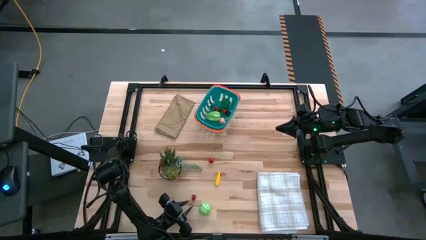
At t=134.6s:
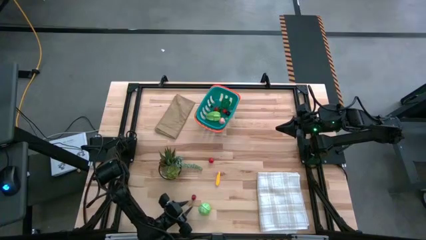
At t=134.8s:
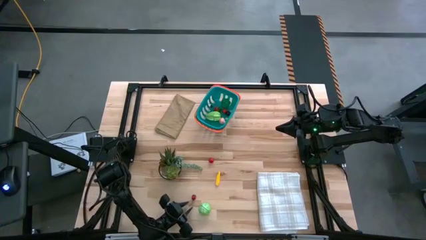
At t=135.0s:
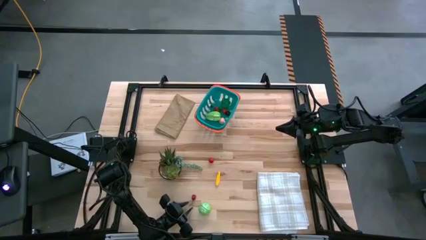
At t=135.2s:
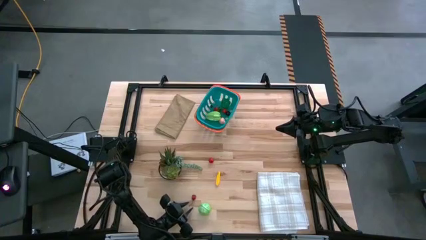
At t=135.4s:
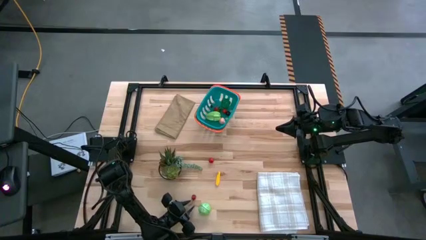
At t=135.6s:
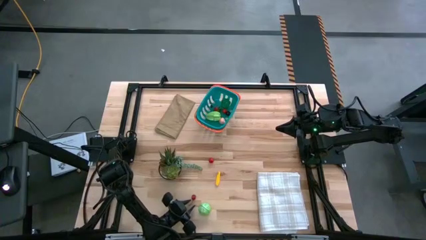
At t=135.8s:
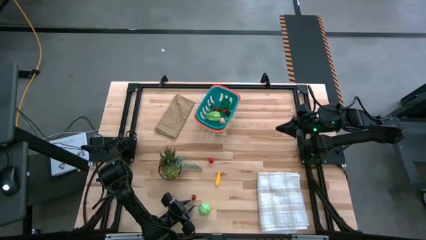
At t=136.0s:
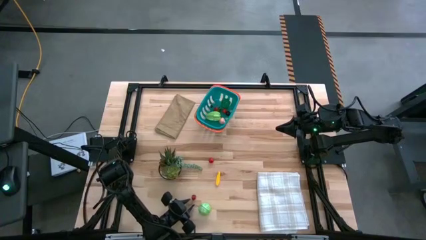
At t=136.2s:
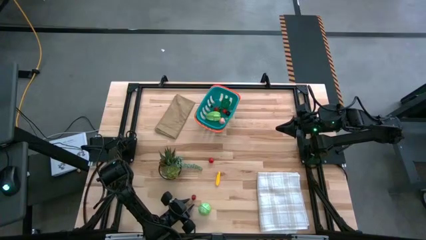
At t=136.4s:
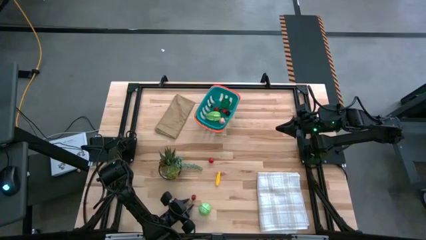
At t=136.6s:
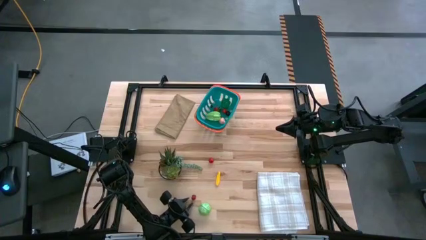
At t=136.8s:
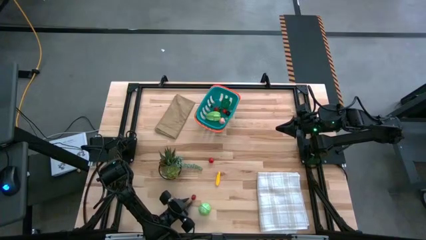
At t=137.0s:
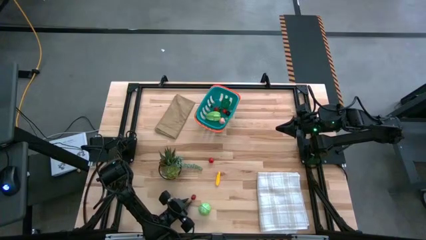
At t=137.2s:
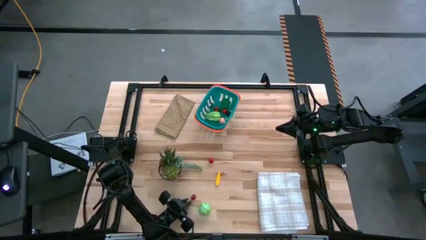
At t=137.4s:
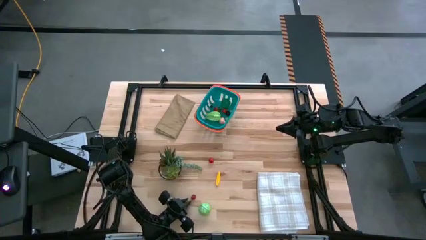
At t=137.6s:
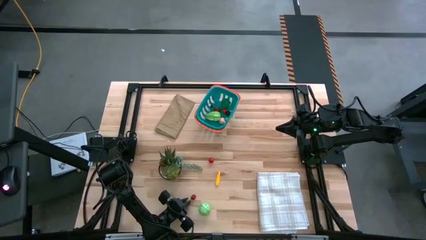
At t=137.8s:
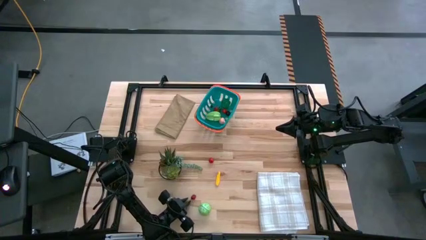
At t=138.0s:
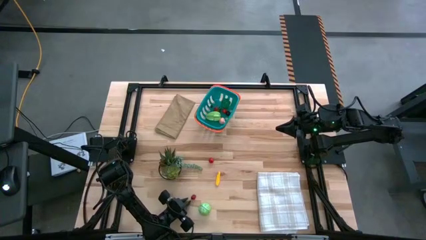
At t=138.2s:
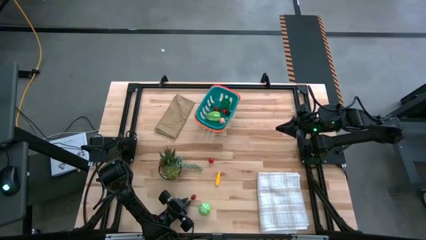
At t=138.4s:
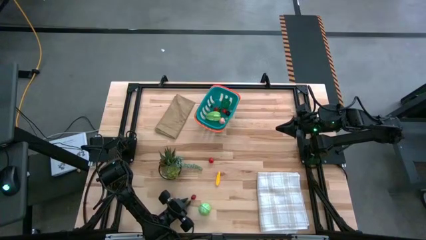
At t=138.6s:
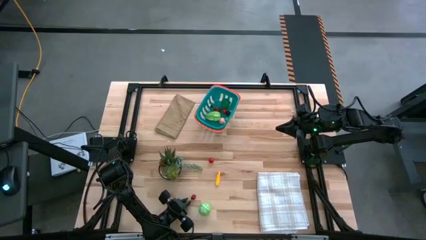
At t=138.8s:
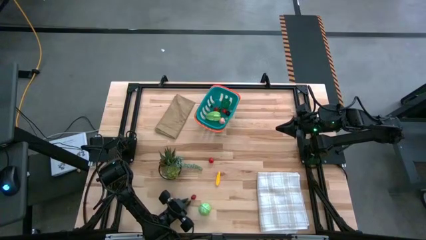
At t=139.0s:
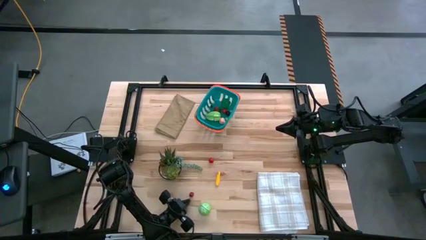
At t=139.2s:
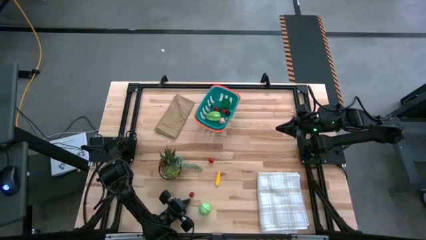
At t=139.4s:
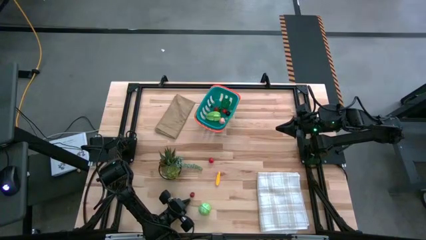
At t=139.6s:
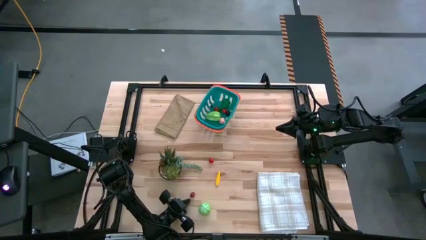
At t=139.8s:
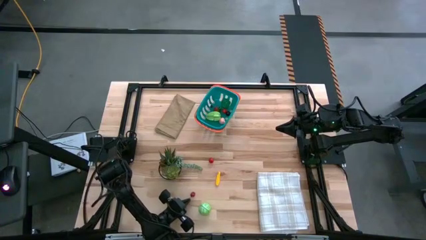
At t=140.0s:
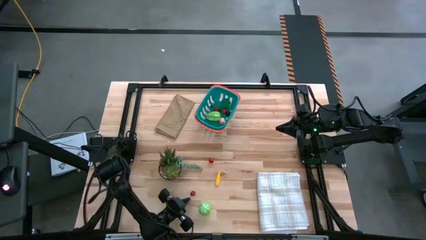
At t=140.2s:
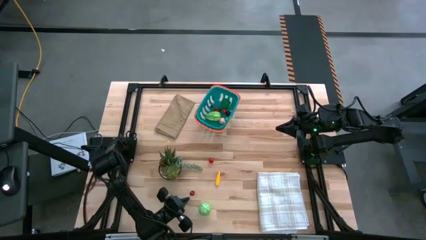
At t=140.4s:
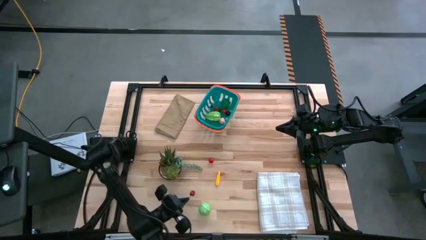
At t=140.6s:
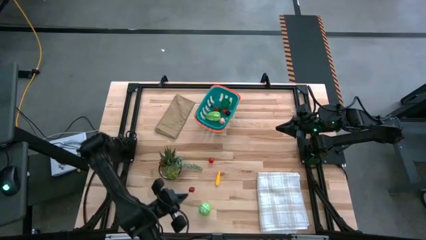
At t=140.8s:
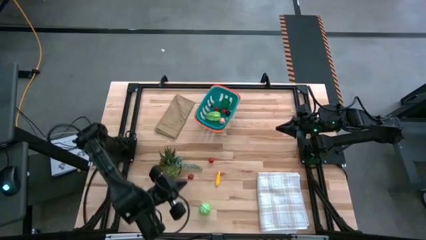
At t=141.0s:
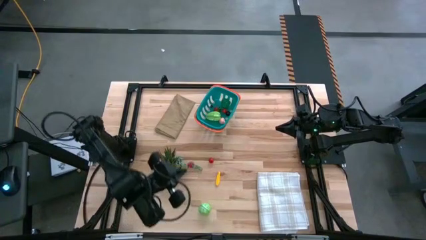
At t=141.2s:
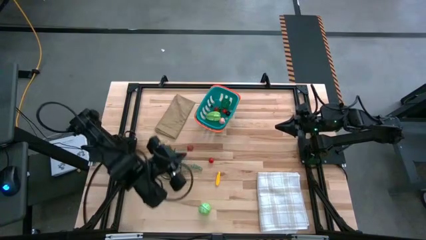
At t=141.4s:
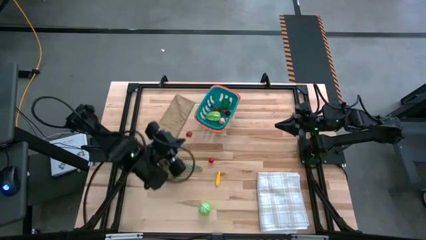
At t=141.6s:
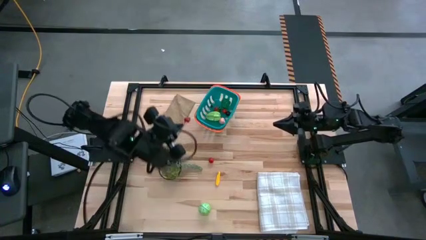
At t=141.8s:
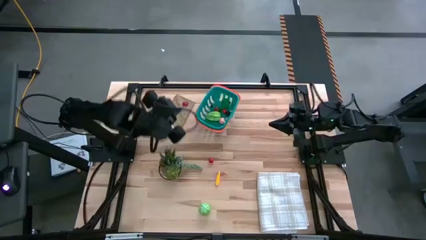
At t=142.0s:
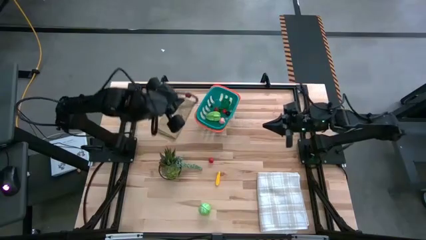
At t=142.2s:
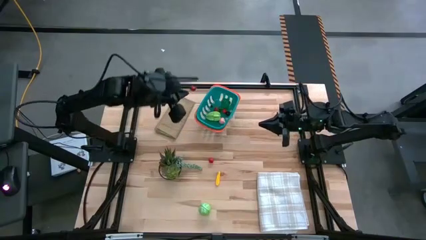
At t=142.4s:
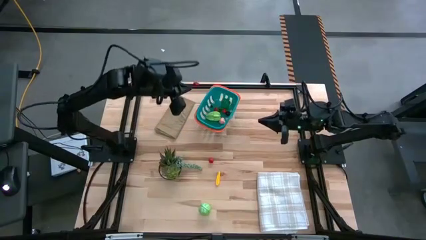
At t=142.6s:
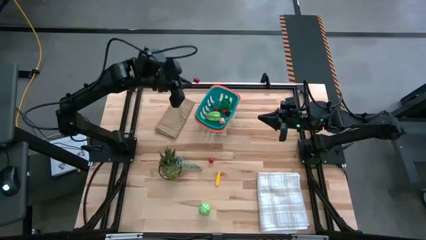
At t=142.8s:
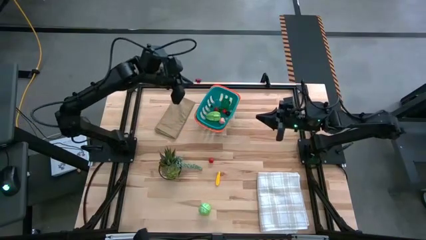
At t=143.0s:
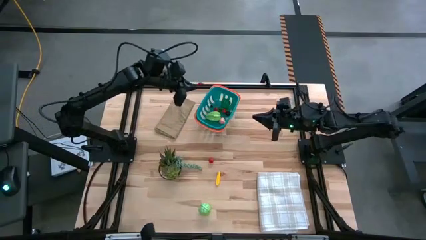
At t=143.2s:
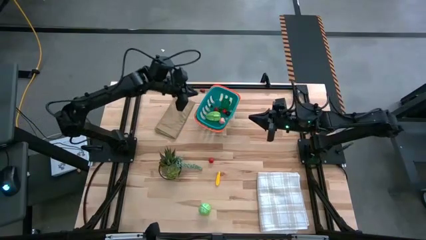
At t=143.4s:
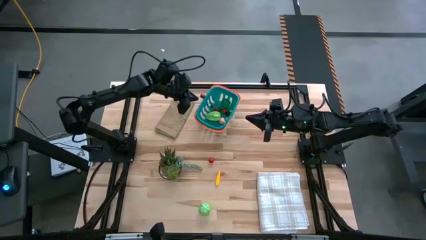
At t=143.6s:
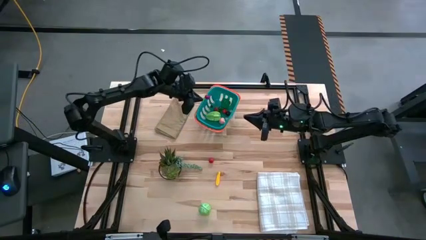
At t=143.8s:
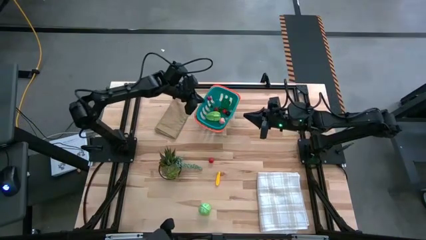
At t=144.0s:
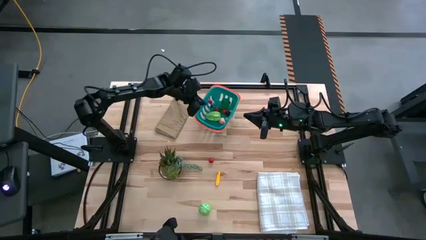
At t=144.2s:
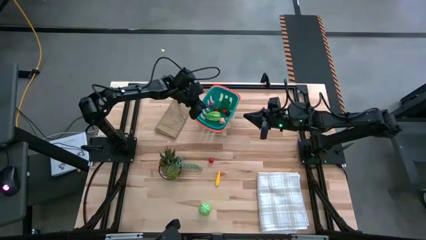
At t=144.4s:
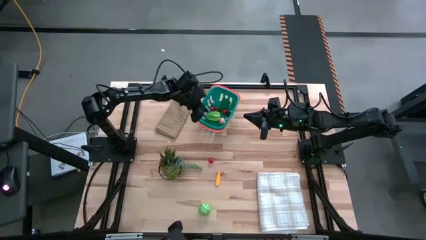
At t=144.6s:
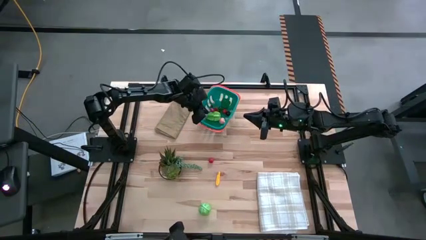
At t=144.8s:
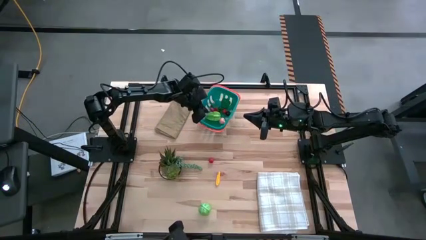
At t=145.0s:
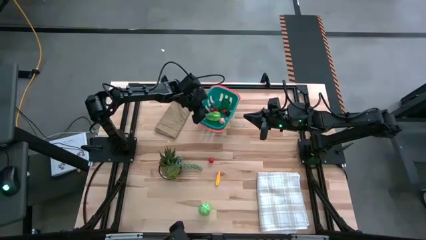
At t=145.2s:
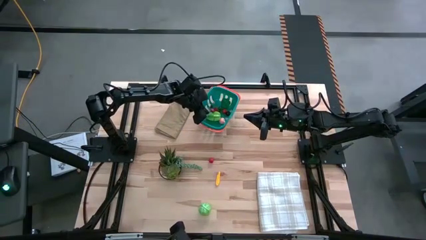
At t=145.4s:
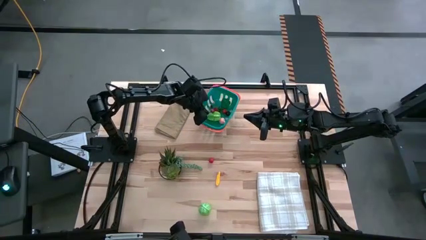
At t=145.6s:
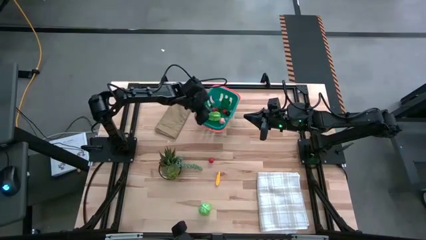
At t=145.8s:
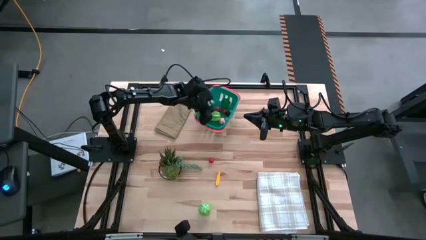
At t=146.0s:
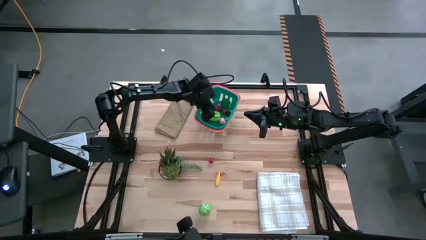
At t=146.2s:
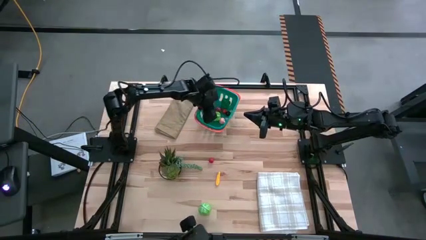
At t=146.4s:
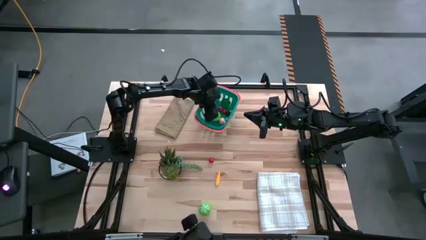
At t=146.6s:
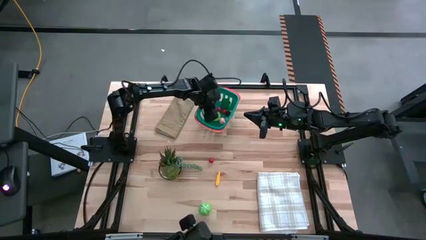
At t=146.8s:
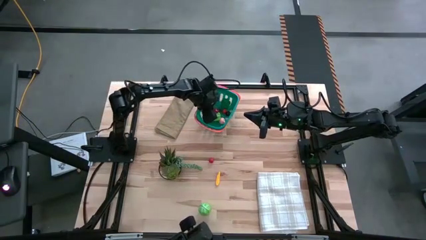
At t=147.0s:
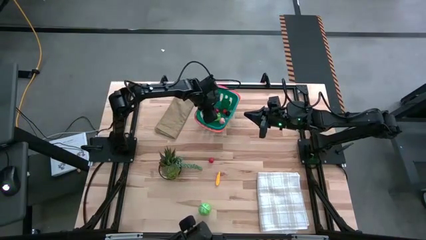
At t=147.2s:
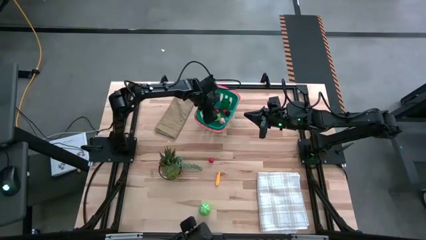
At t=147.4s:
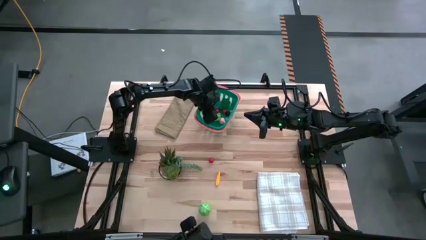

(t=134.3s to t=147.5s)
Task: Pick and placing Produce into tupperware
Put the red cherry in the green basket
